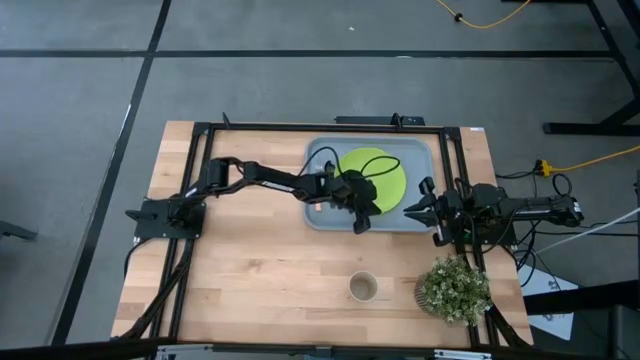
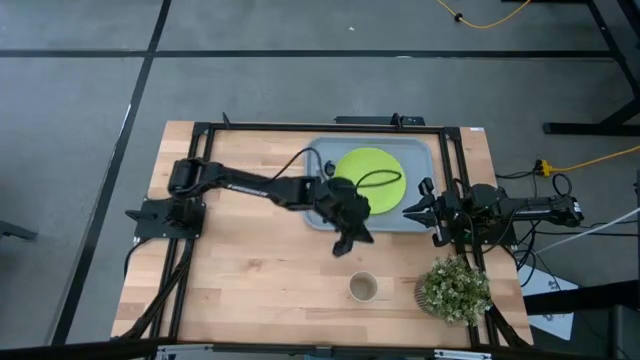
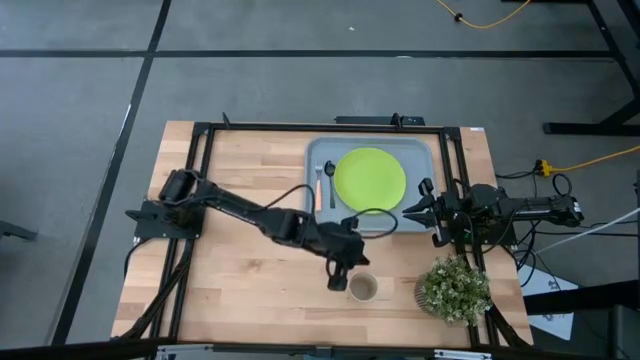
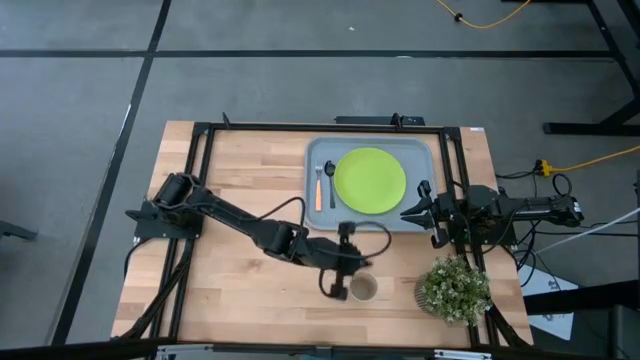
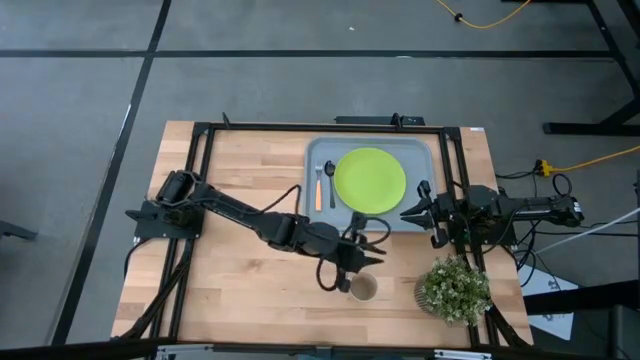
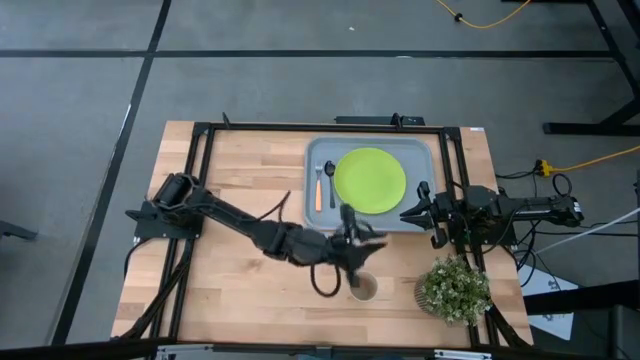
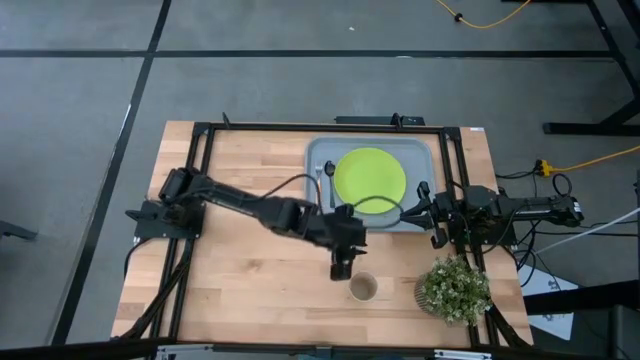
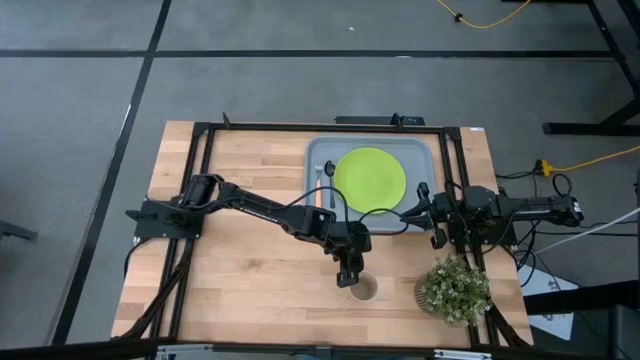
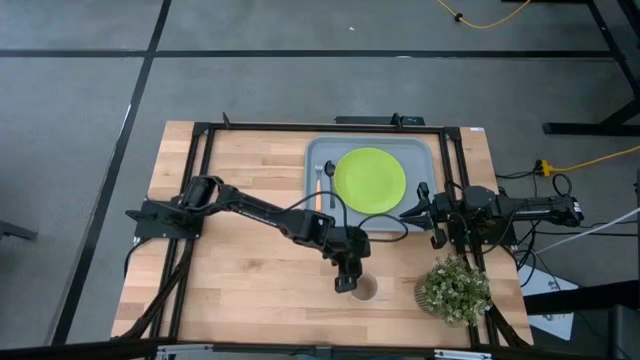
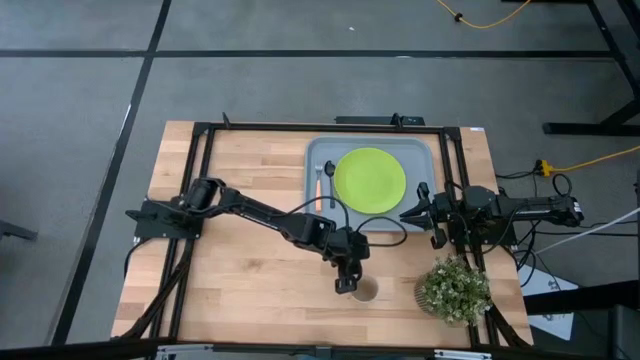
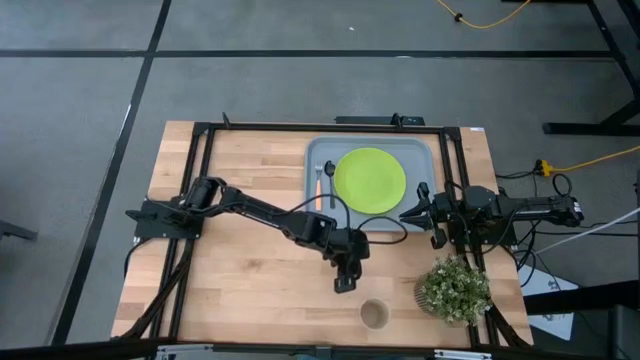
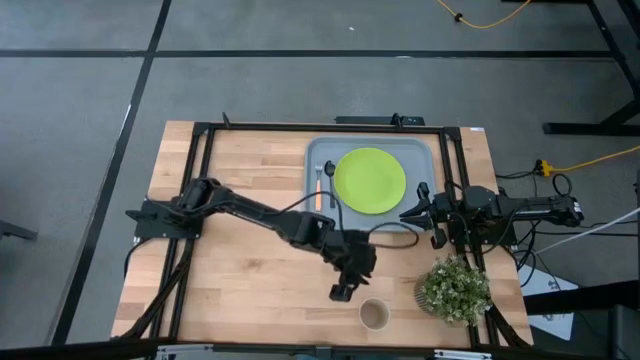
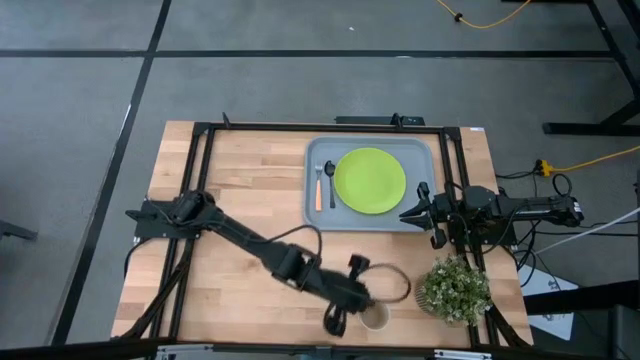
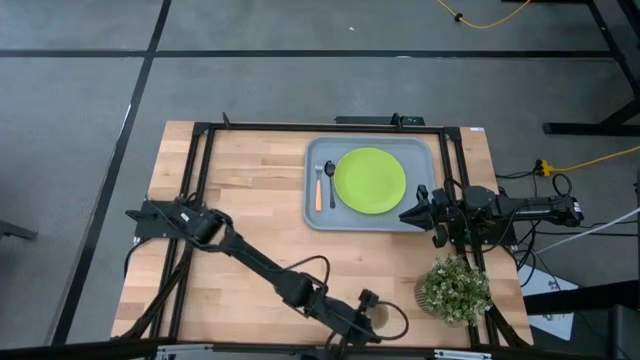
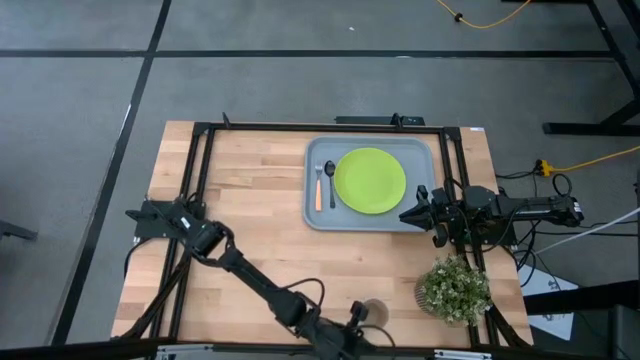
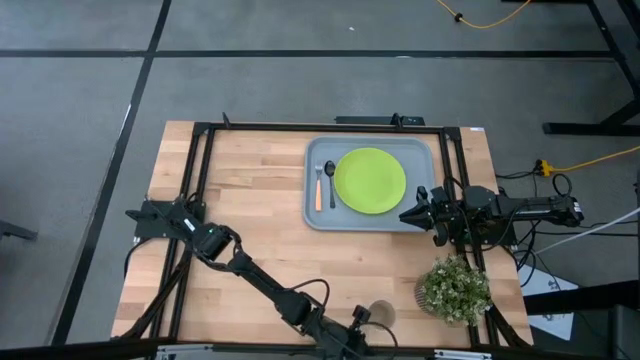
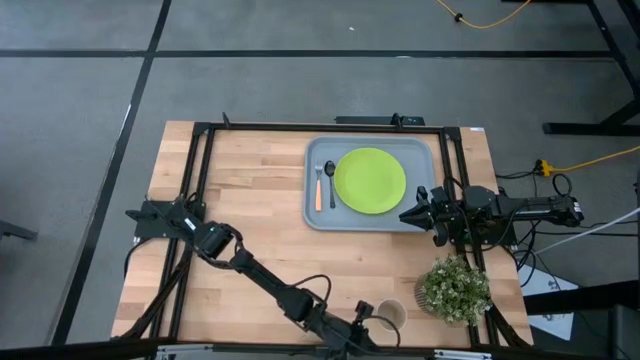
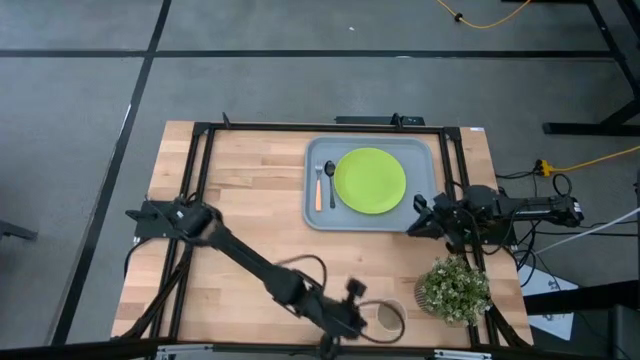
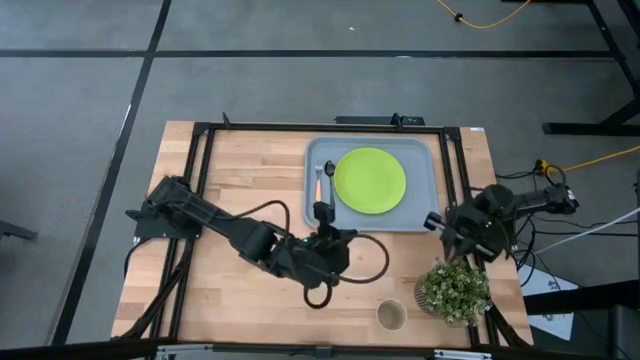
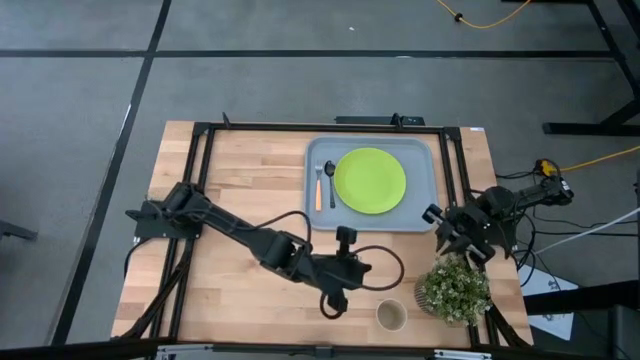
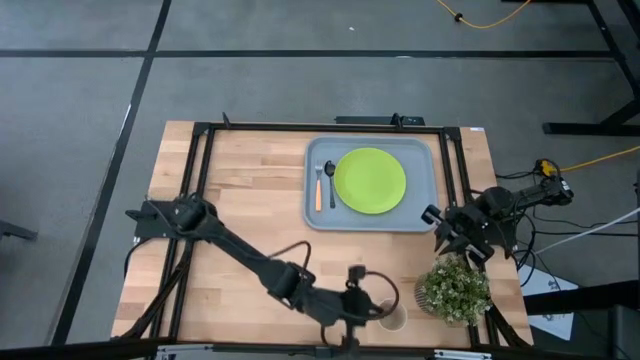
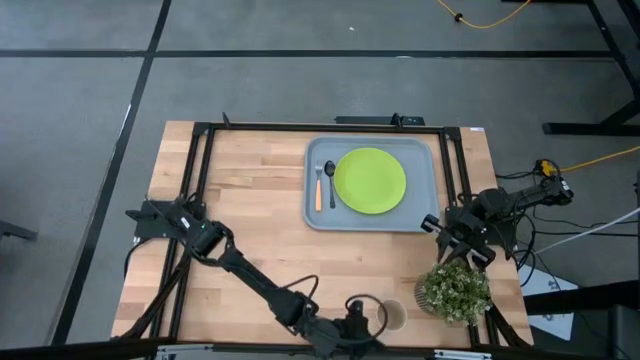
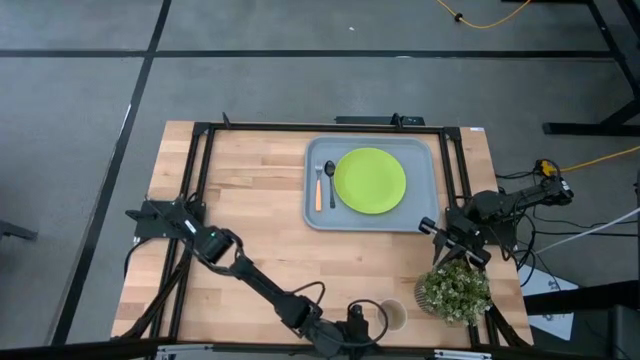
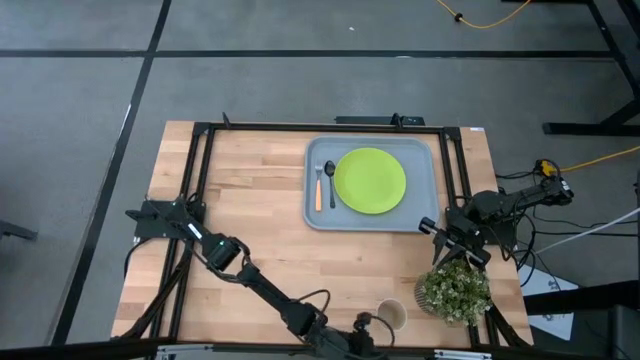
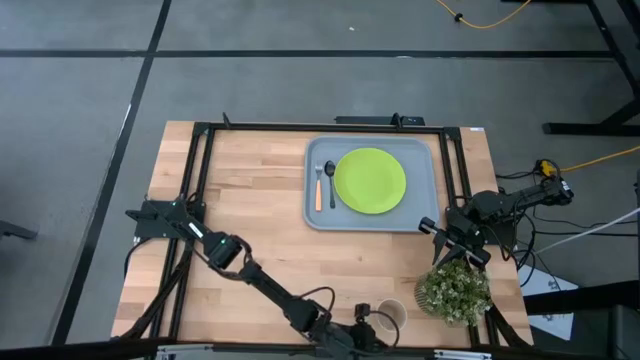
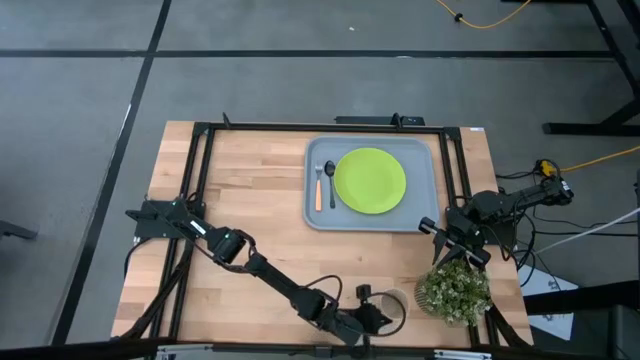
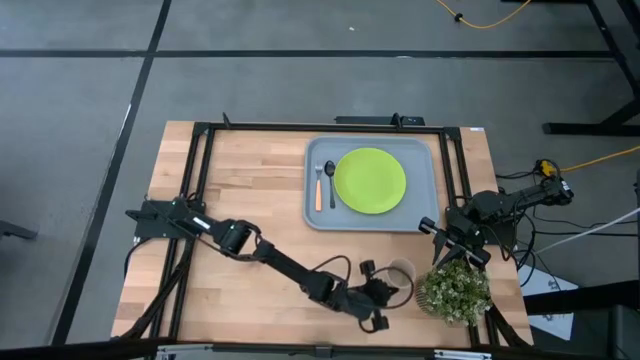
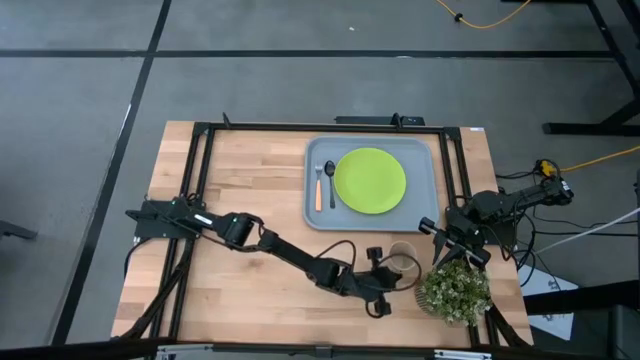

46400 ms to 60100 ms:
Task: Pick and place plate/cup/fork/spoon on tray
Adjust the white cup

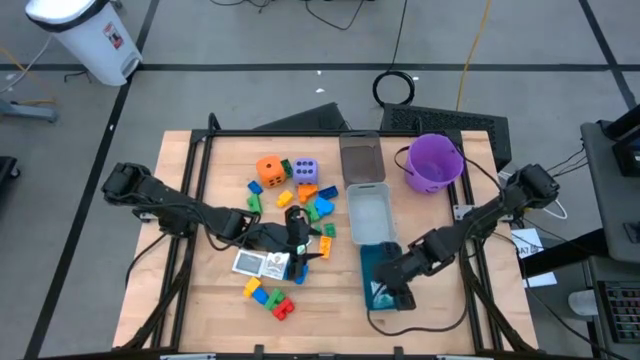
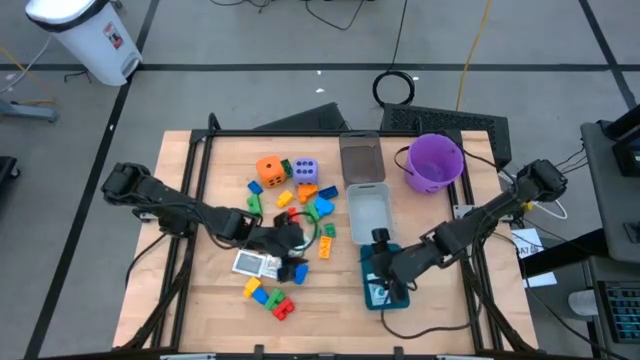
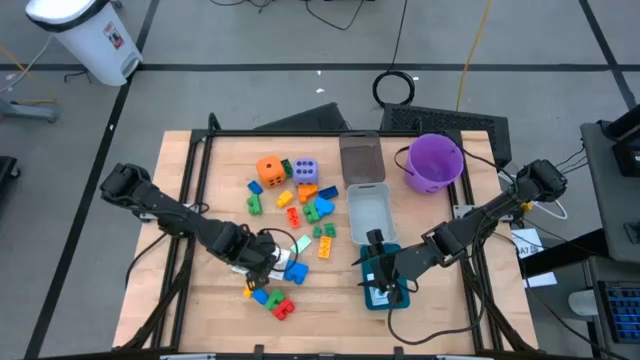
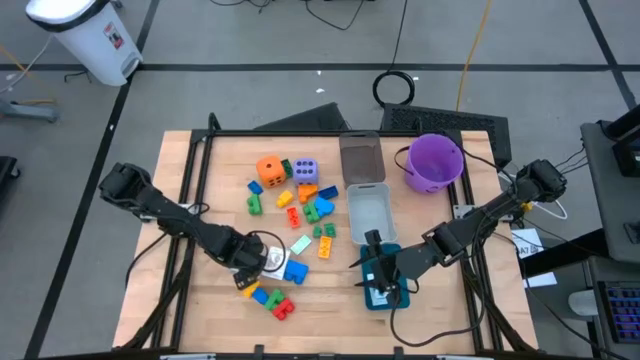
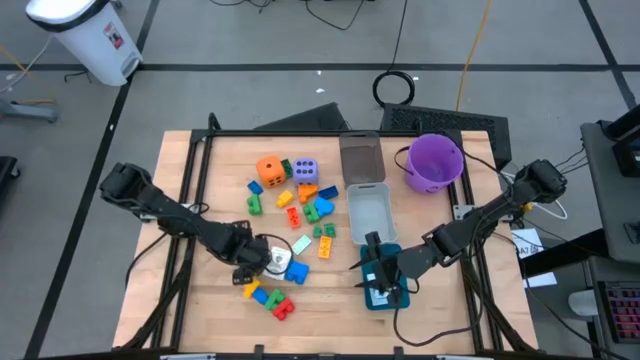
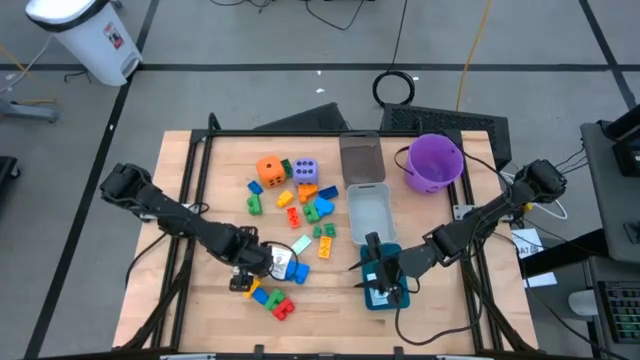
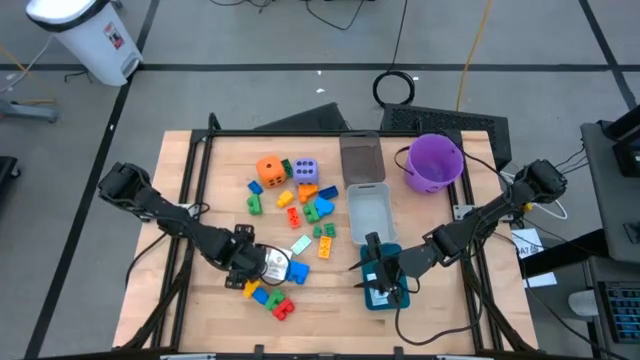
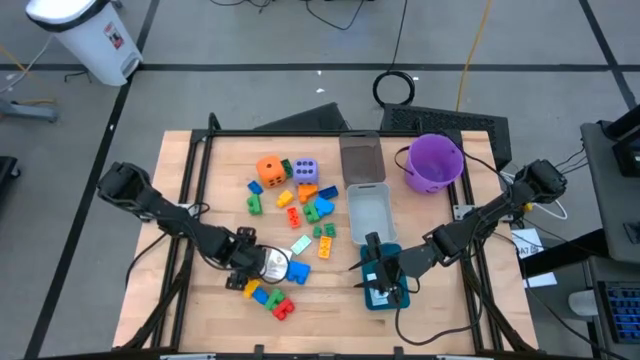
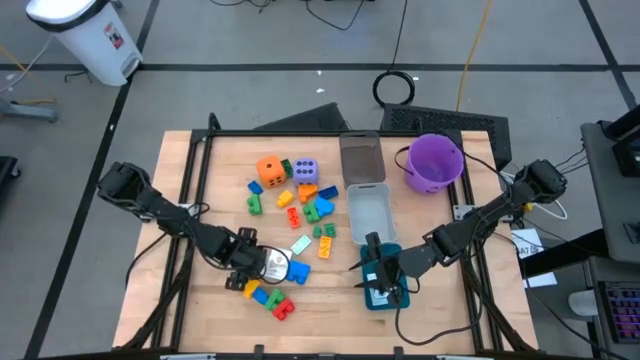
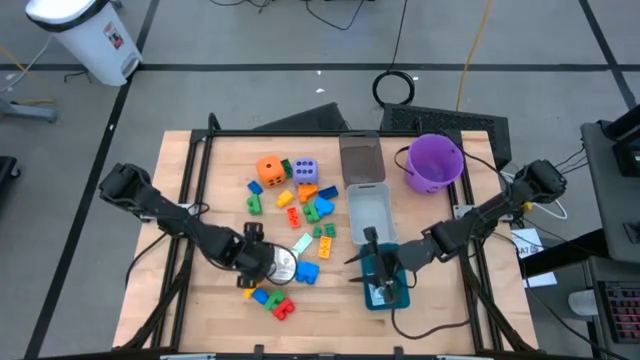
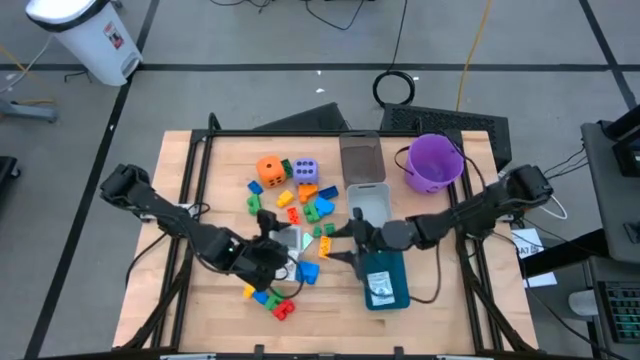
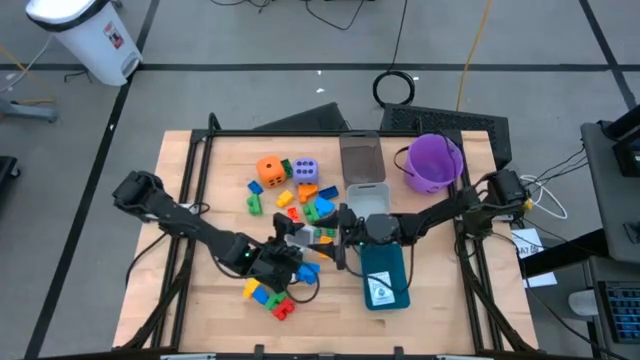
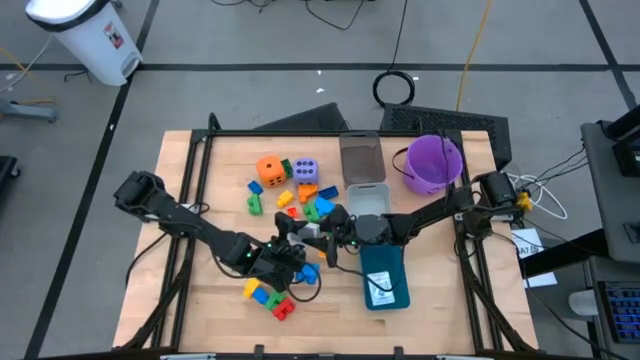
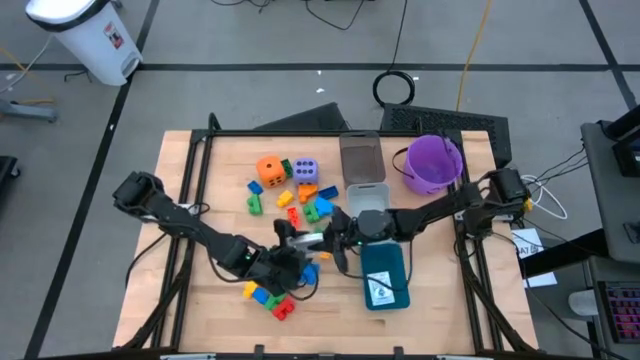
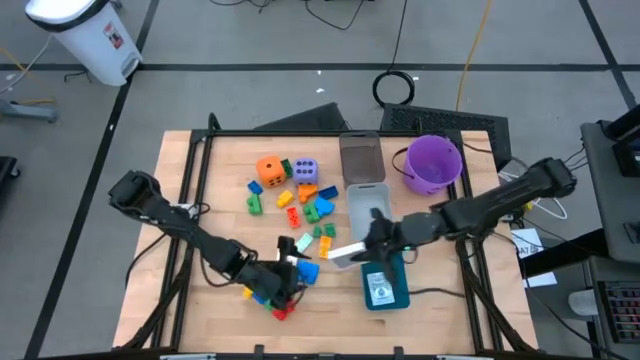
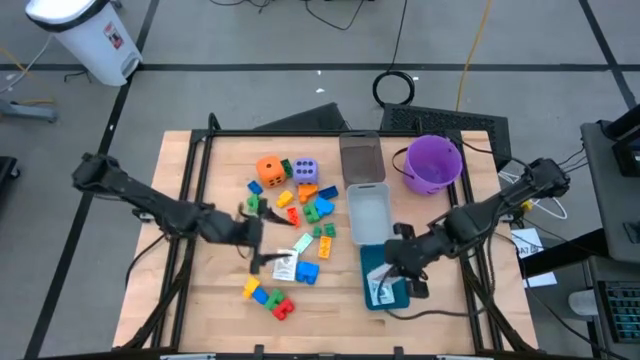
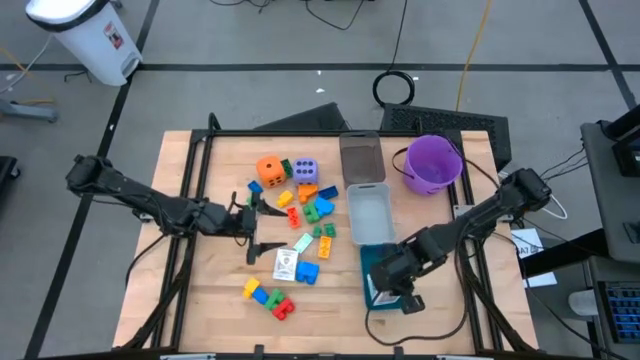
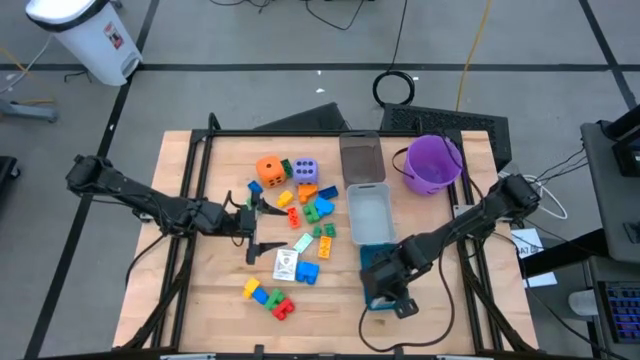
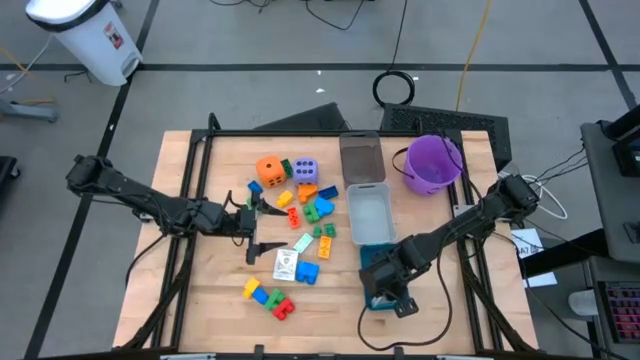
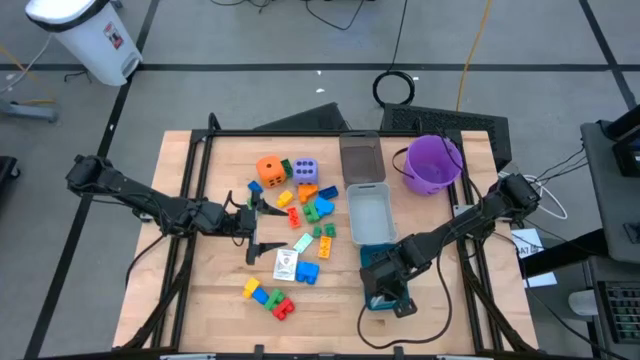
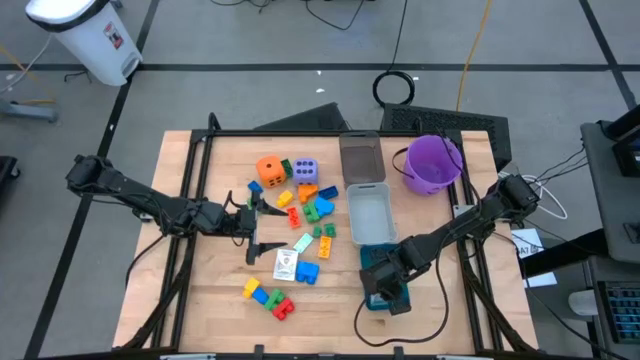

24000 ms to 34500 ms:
Task: Pick & Place Toys
Put the black deck of cards into the blue bin
